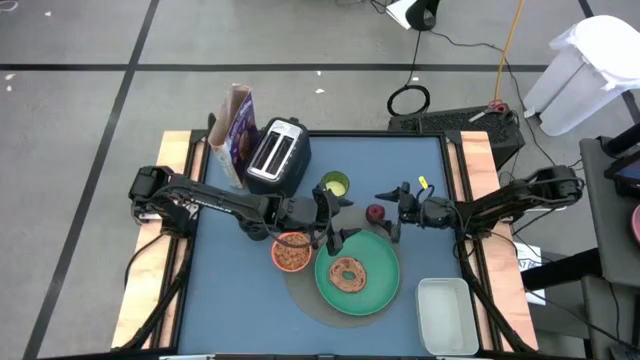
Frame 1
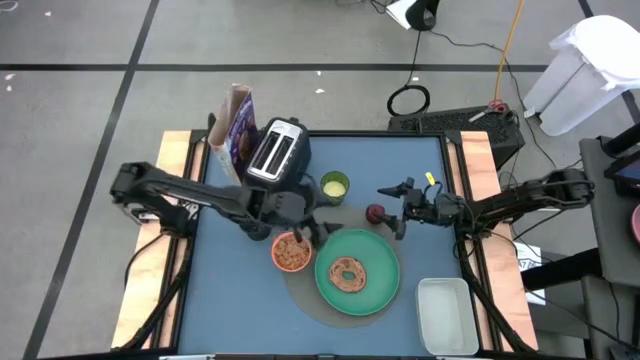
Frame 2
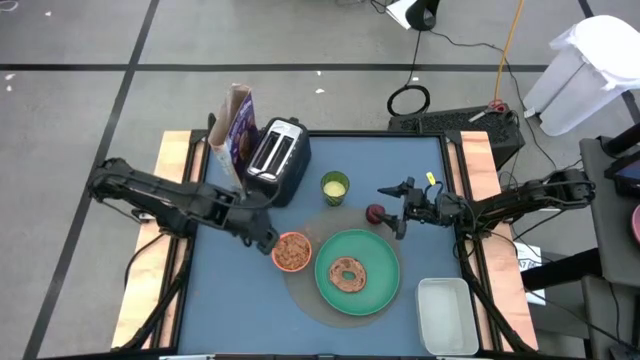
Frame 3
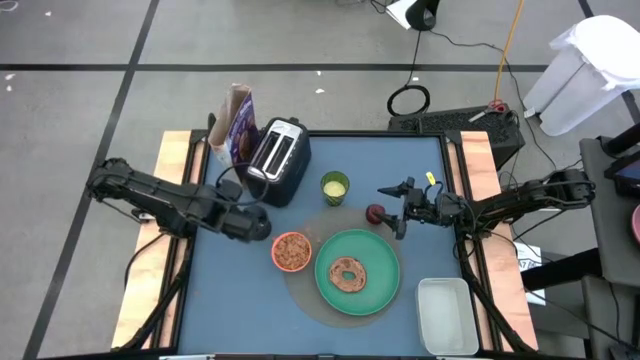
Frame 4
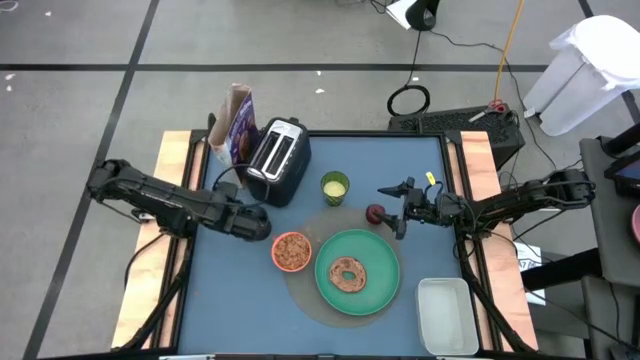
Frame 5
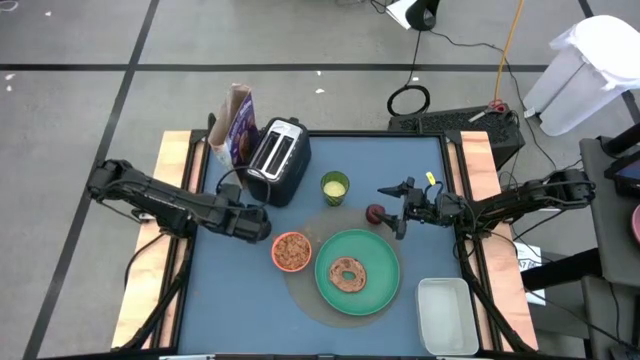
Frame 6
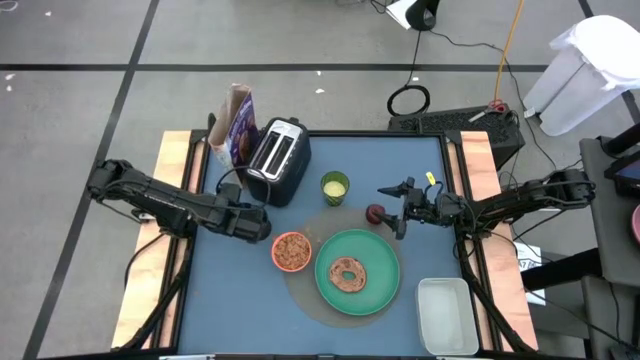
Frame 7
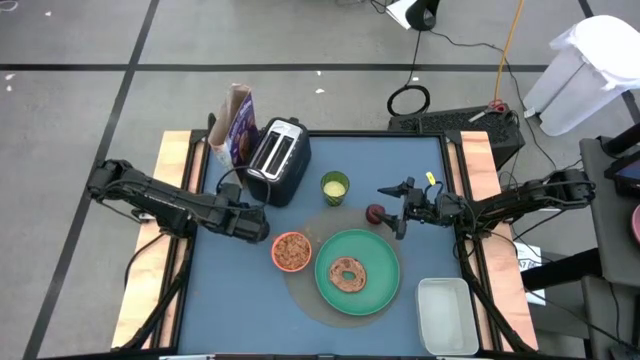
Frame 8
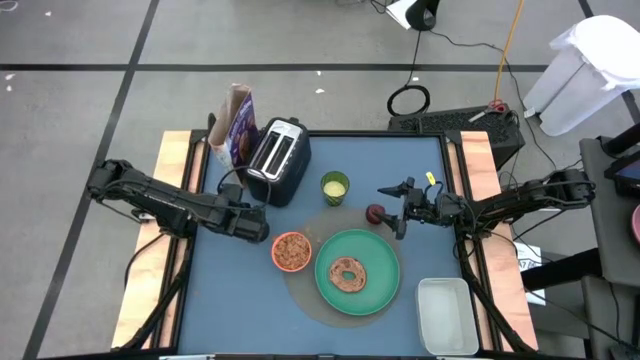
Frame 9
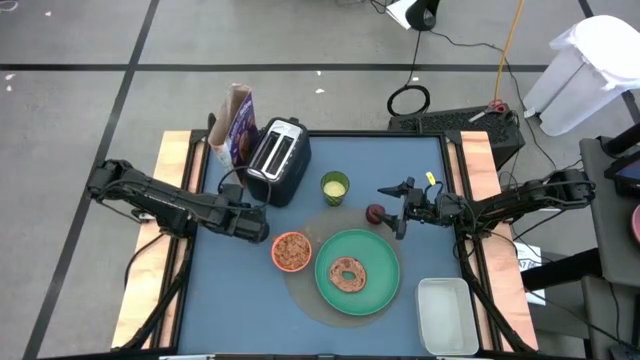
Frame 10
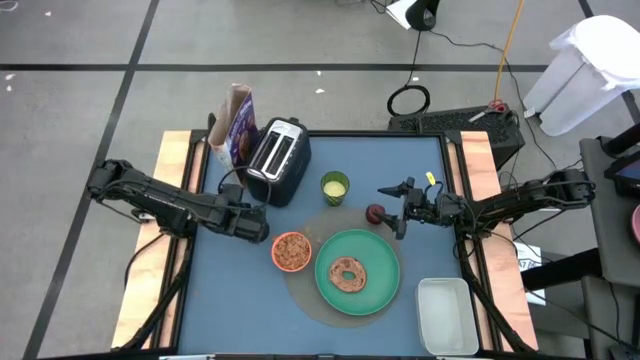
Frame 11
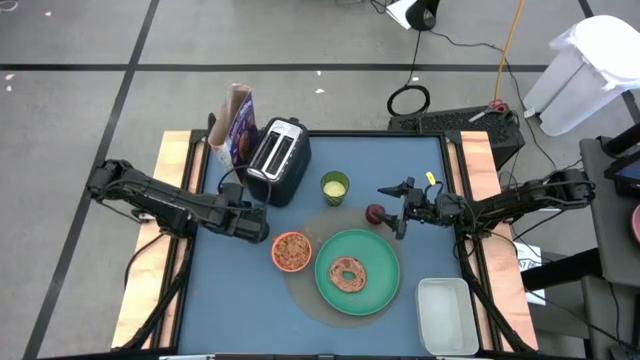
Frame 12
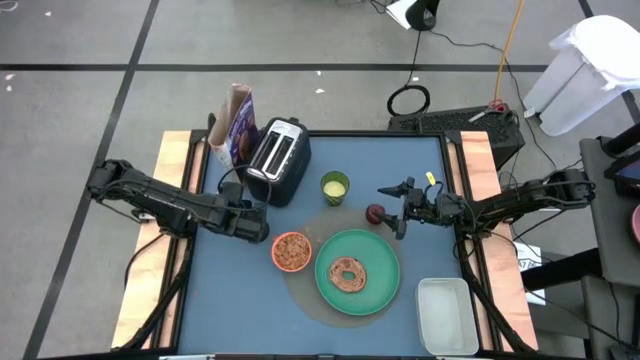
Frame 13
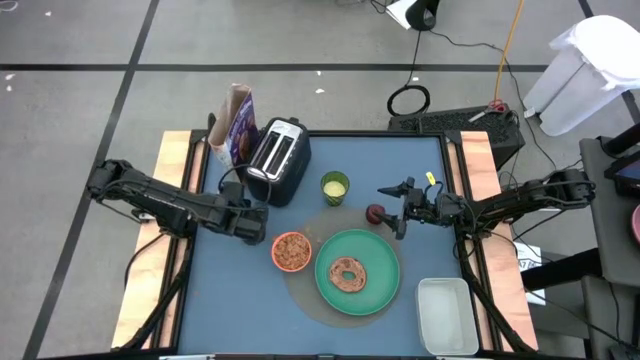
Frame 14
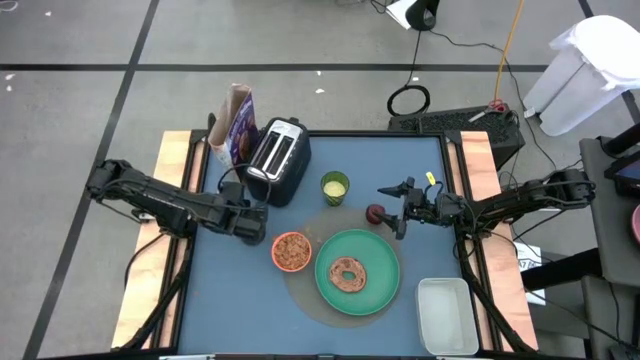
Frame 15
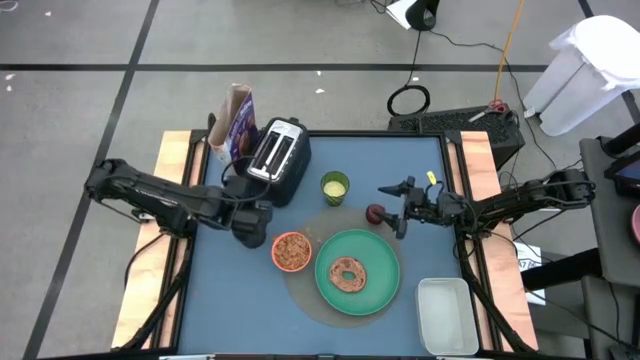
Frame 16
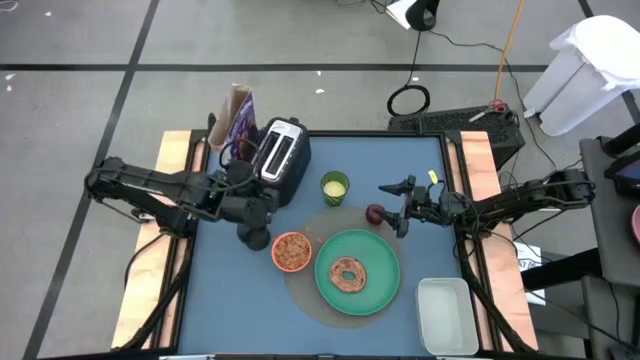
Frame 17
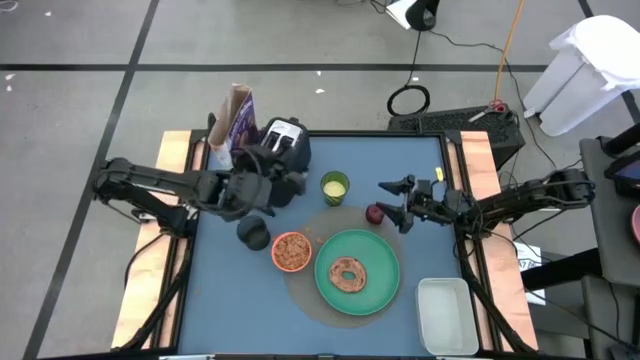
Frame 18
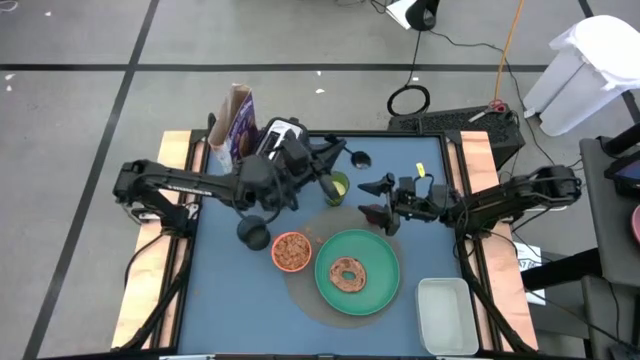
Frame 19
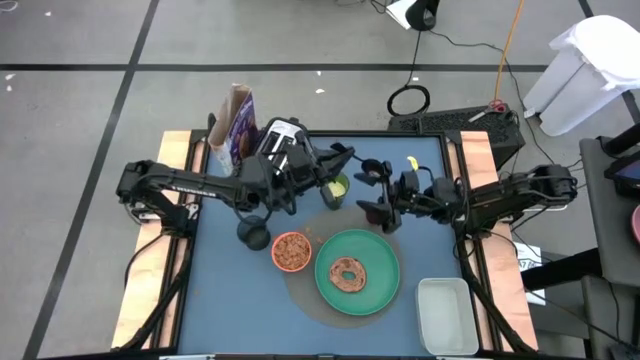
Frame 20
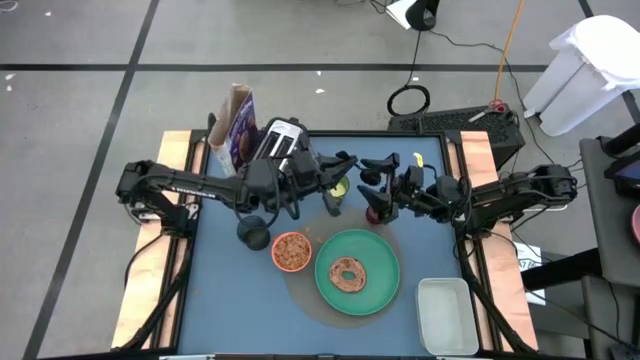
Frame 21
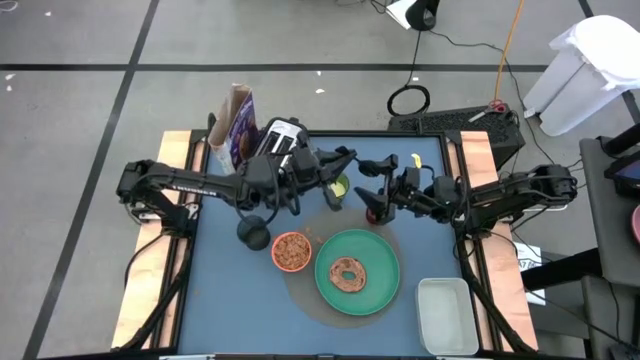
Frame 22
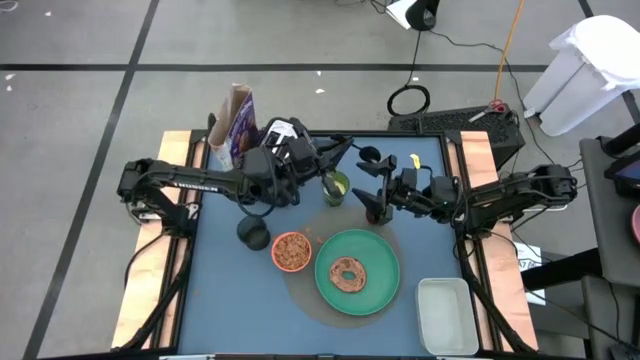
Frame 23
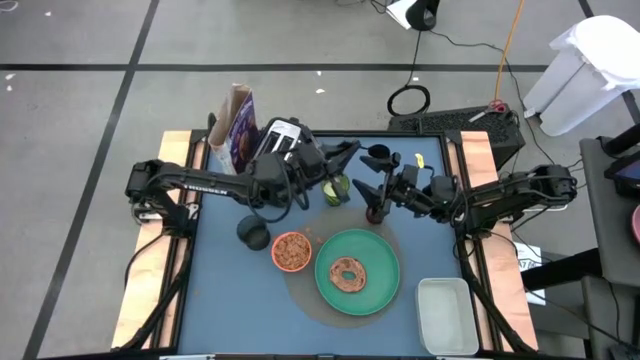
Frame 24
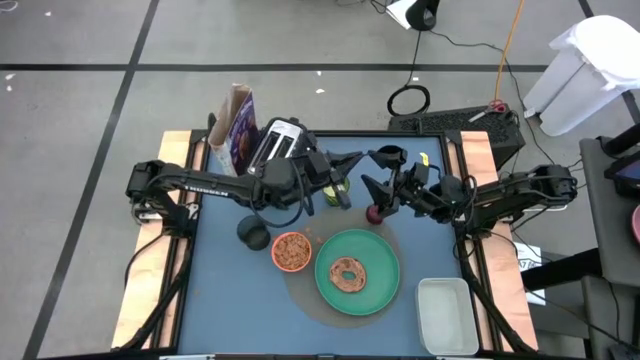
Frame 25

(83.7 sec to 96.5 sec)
Task: Arrange a breakfast setting
Put the spoon beside the orange bowl

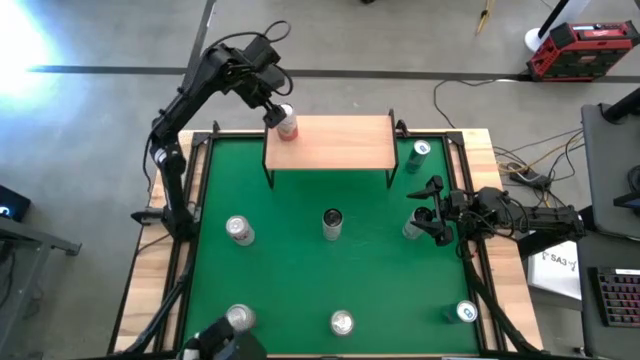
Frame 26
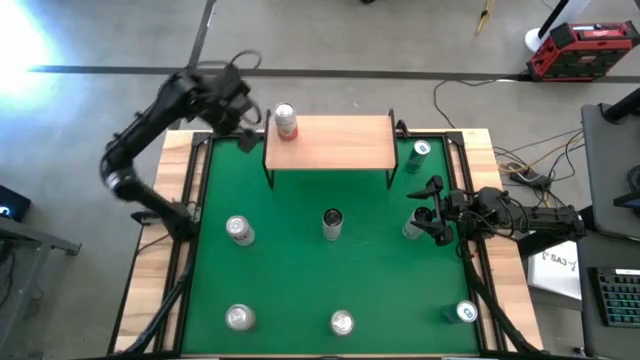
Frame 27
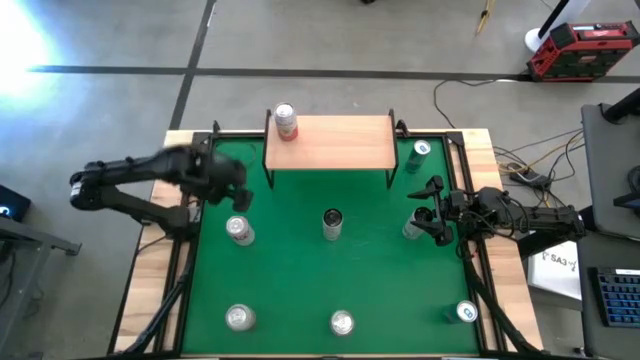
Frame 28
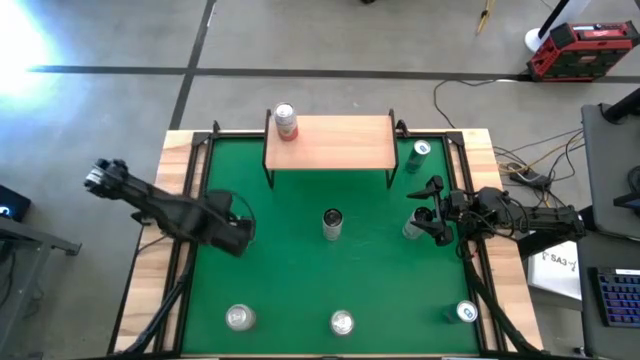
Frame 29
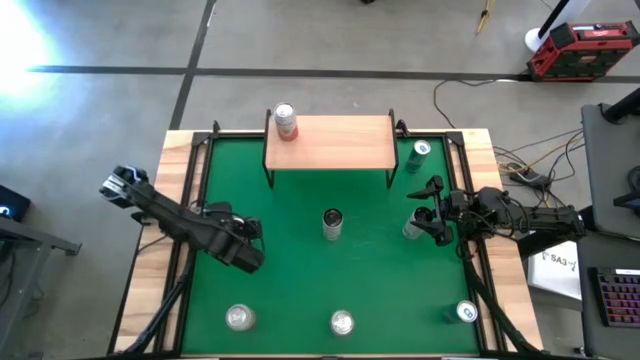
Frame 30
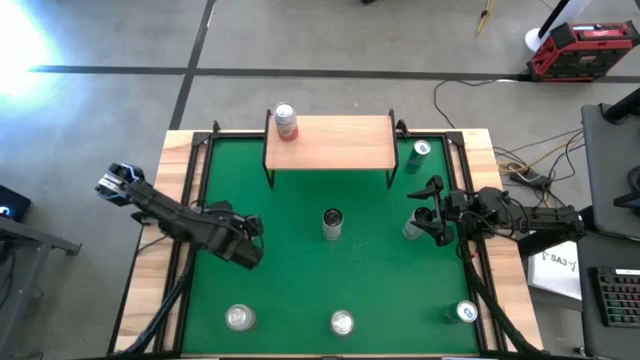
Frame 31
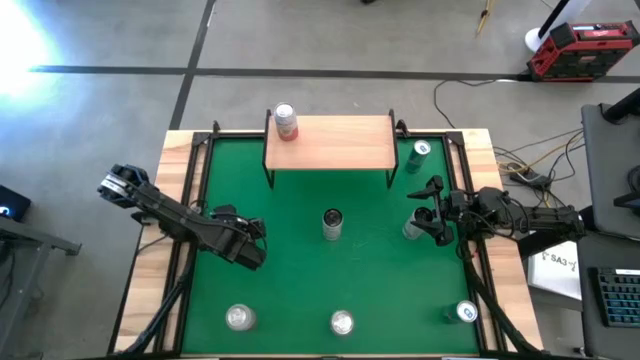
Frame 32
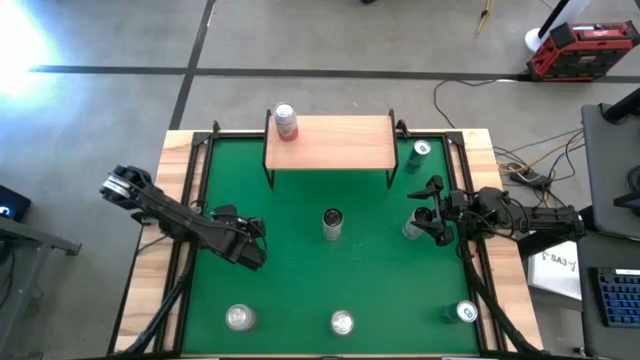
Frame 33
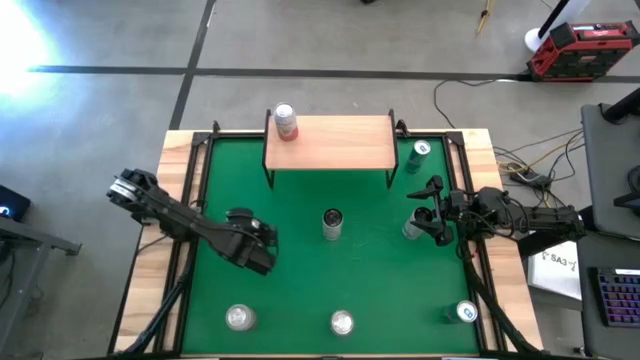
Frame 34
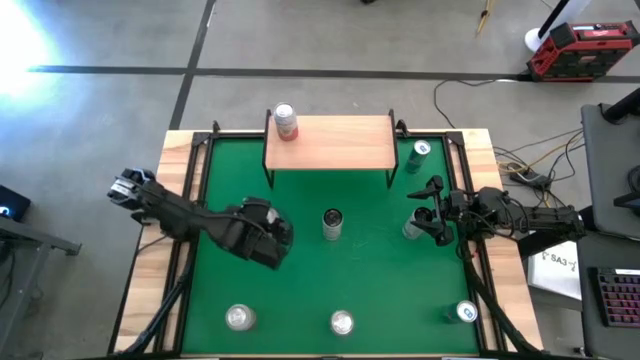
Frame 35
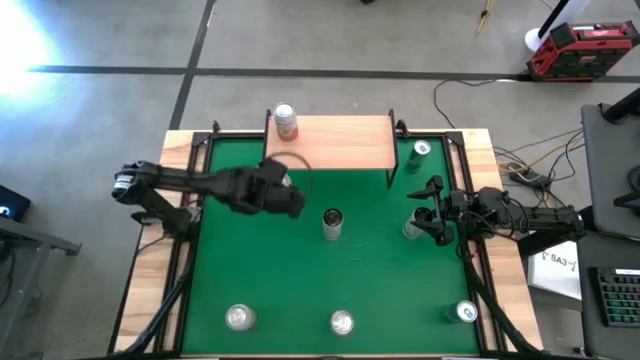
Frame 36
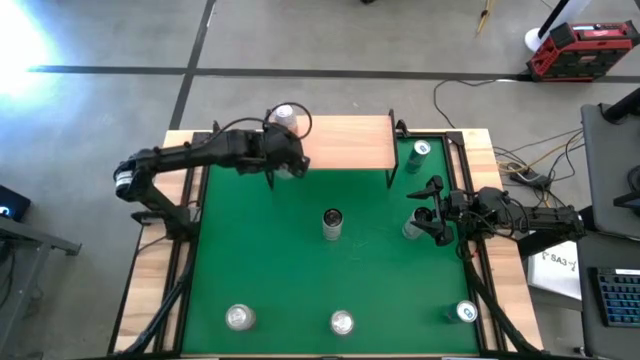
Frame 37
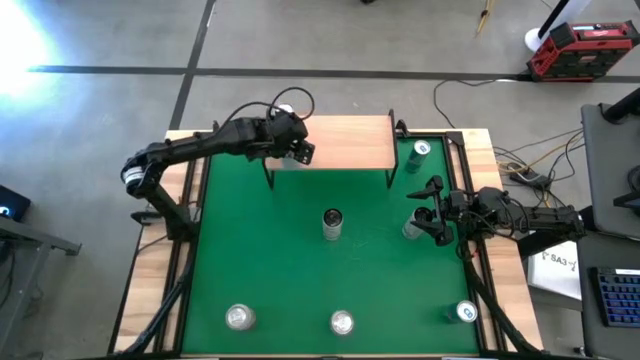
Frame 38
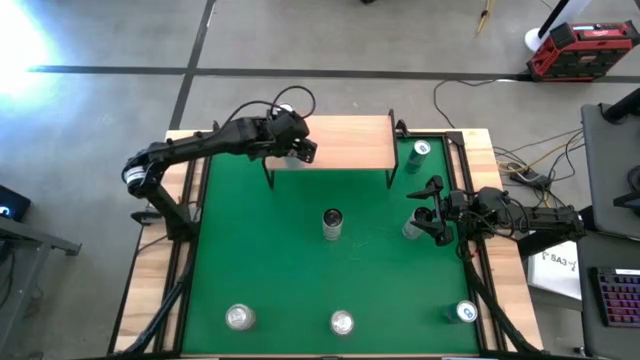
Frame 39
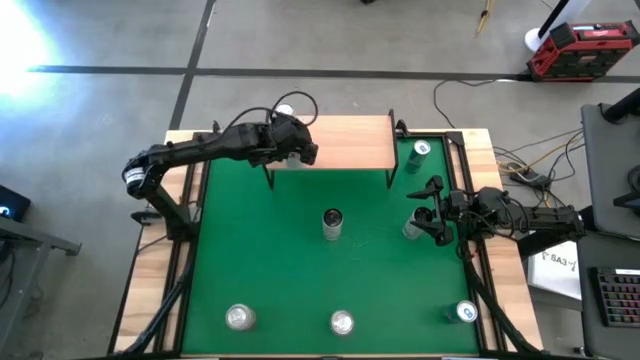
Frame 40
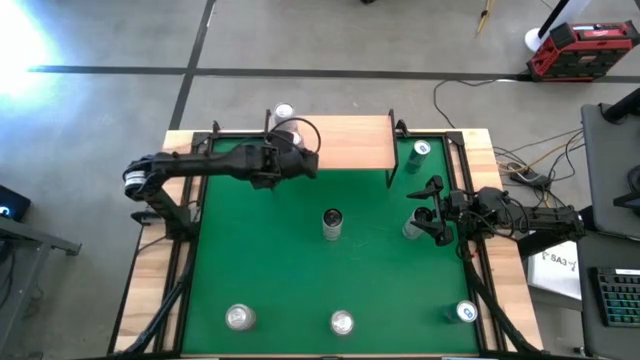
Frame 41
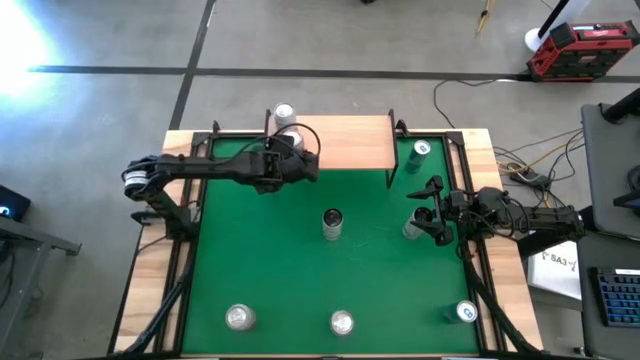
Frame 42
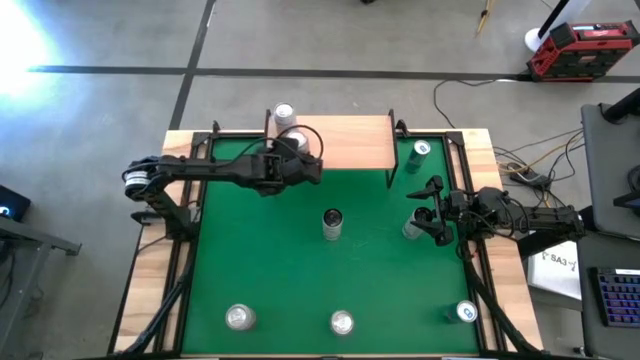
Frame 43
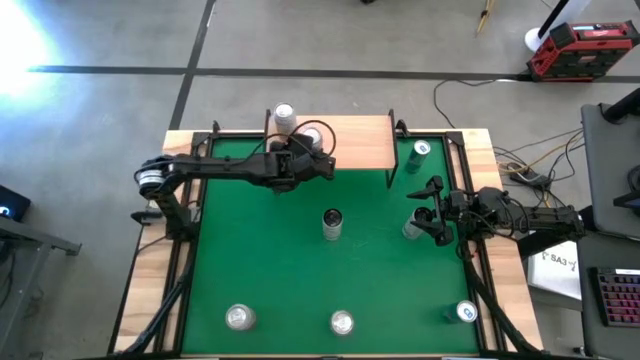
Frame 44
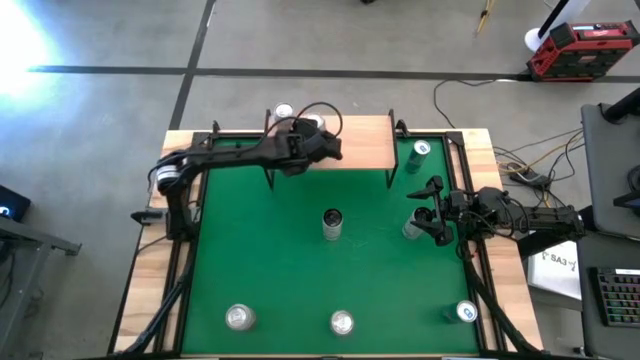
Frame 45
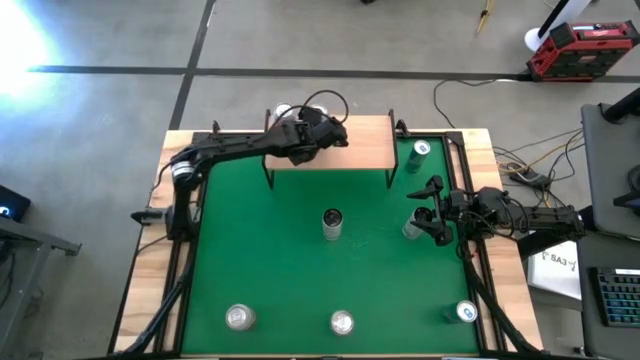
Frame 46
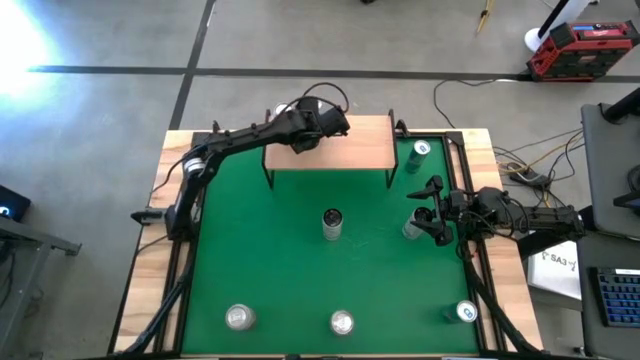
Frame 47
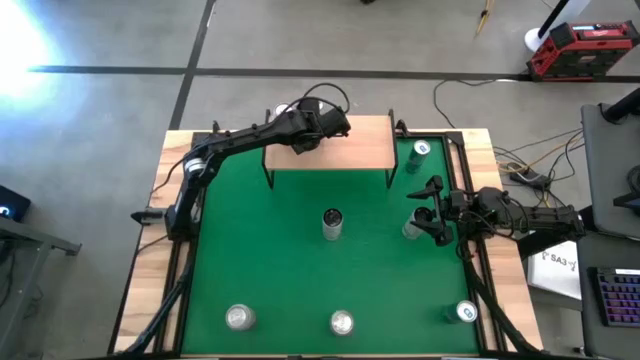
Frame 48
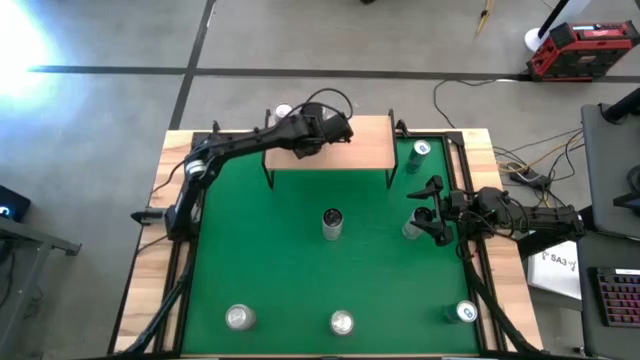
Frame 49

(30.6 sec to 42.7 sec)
Task: Place canned beverage on shelf
Put the top red-silver soda can on the shelf
